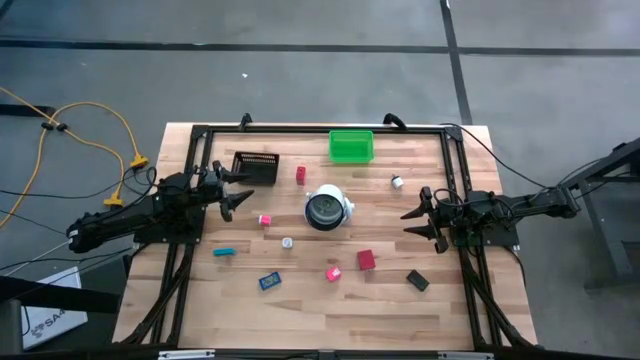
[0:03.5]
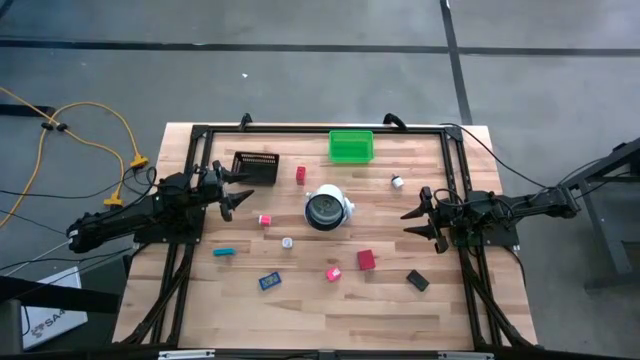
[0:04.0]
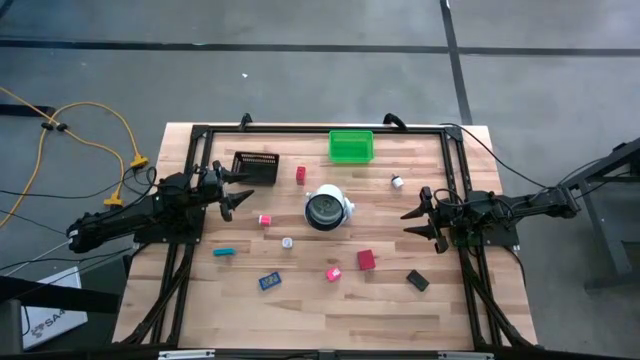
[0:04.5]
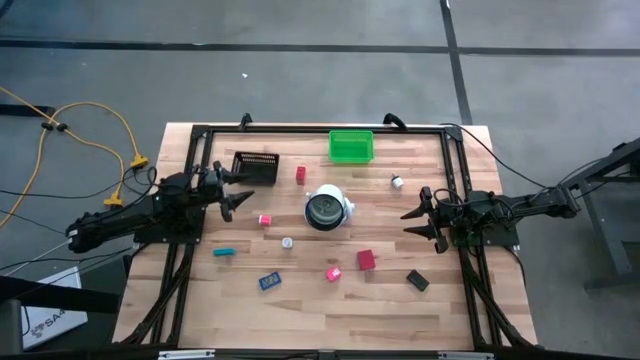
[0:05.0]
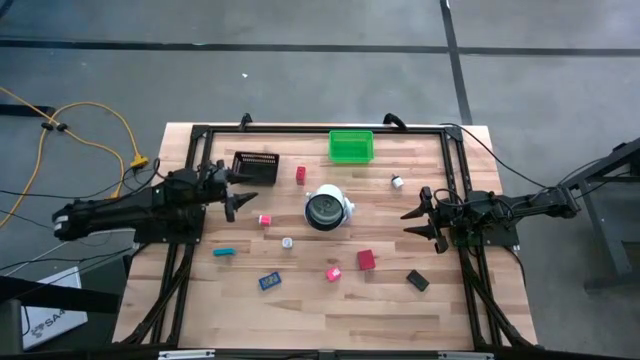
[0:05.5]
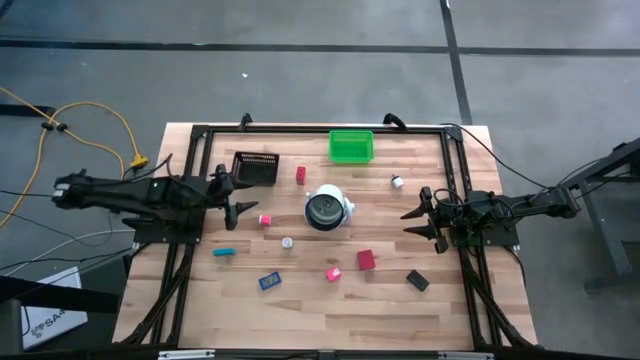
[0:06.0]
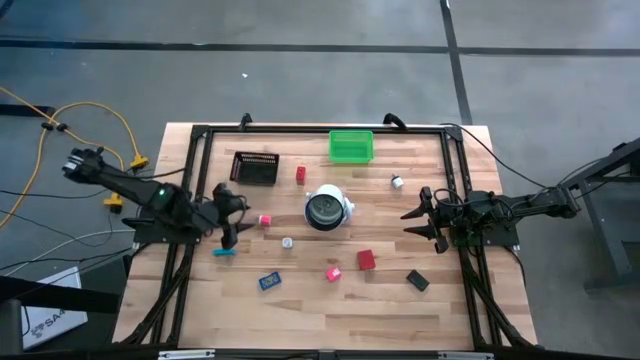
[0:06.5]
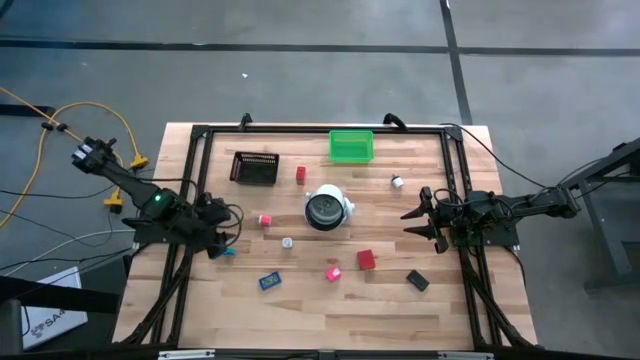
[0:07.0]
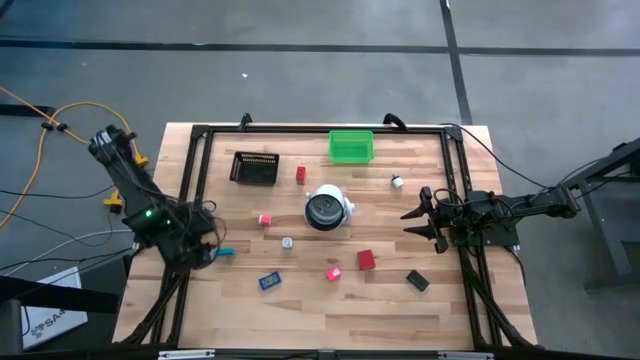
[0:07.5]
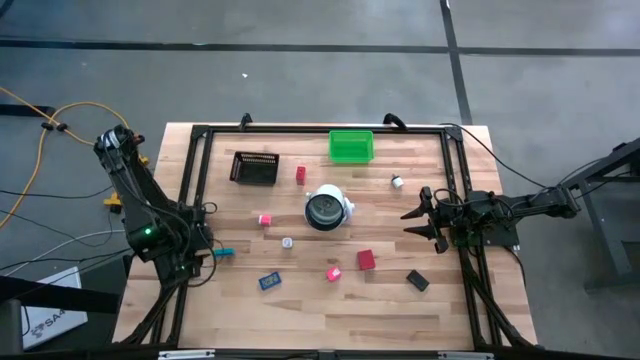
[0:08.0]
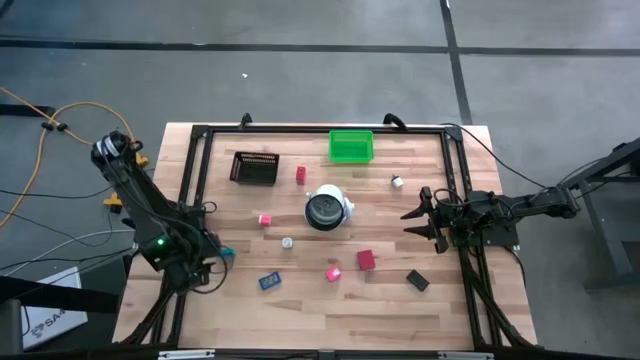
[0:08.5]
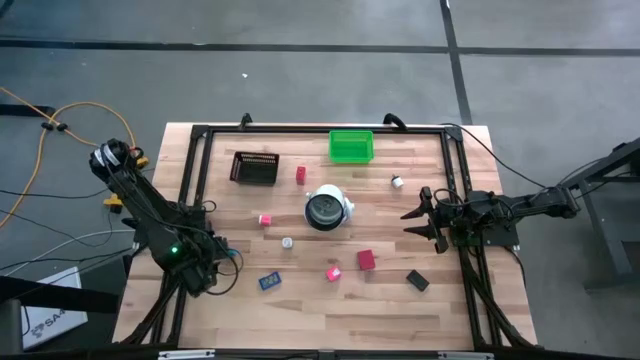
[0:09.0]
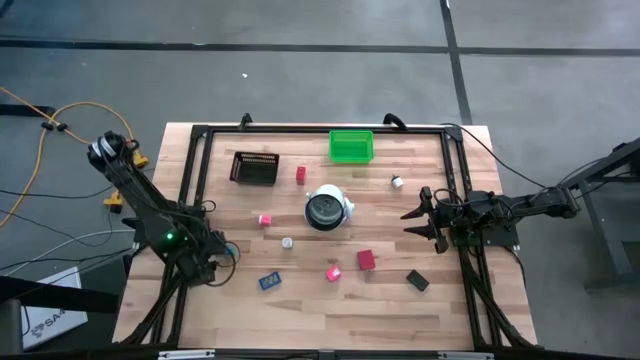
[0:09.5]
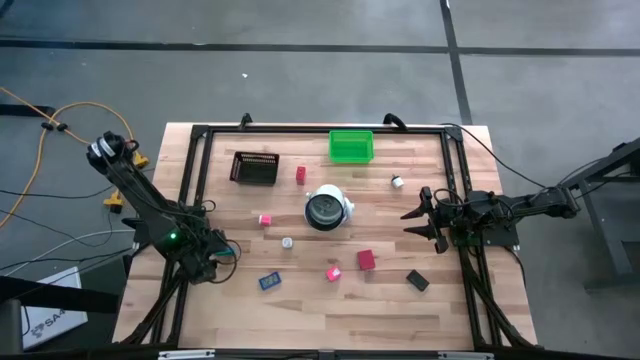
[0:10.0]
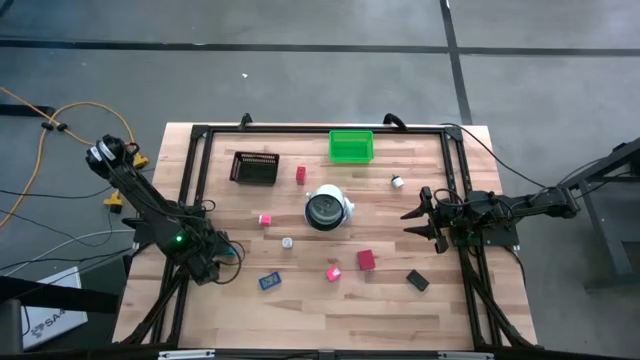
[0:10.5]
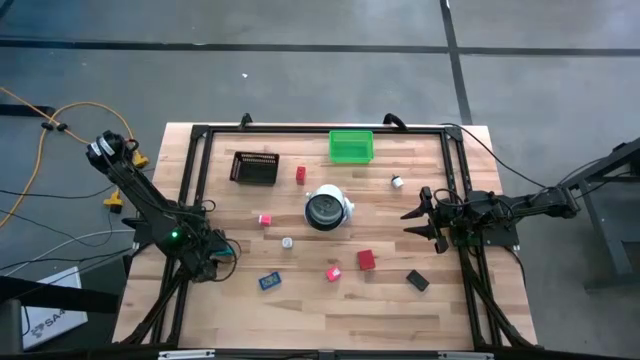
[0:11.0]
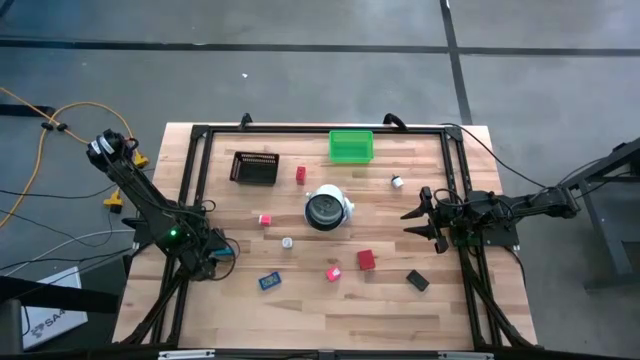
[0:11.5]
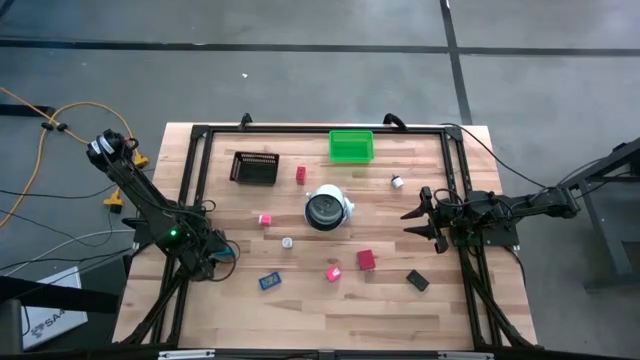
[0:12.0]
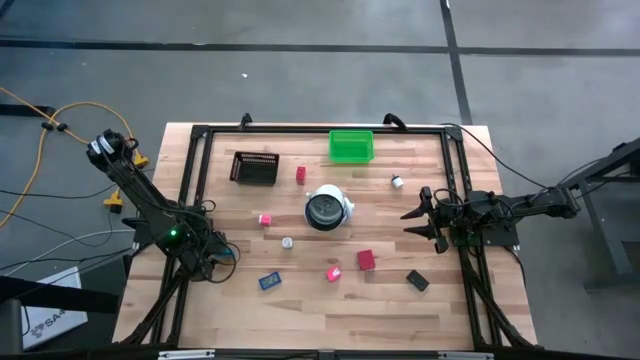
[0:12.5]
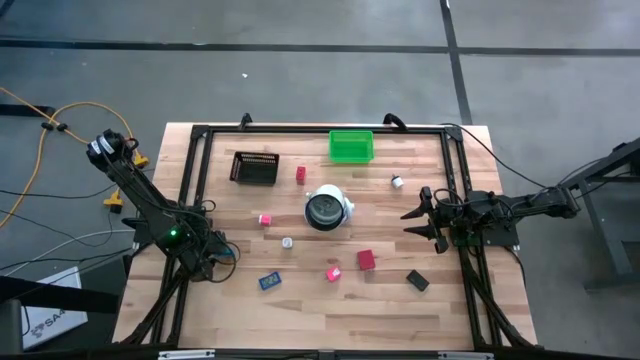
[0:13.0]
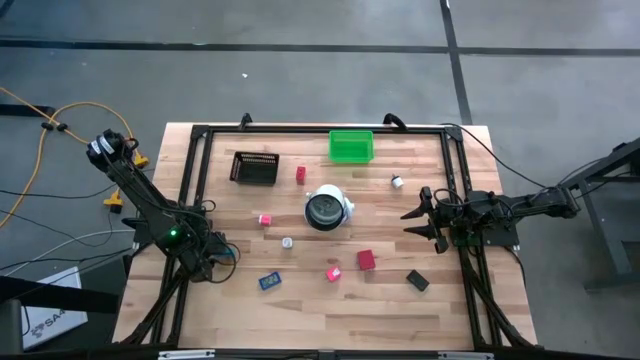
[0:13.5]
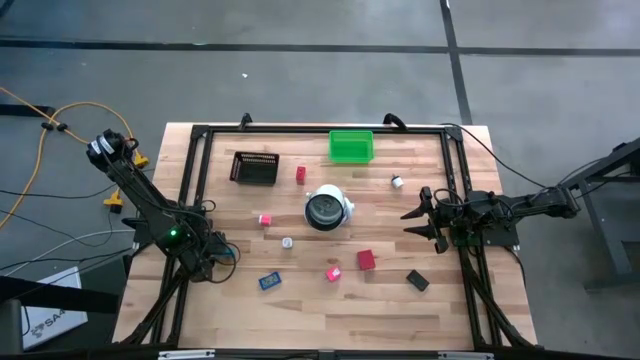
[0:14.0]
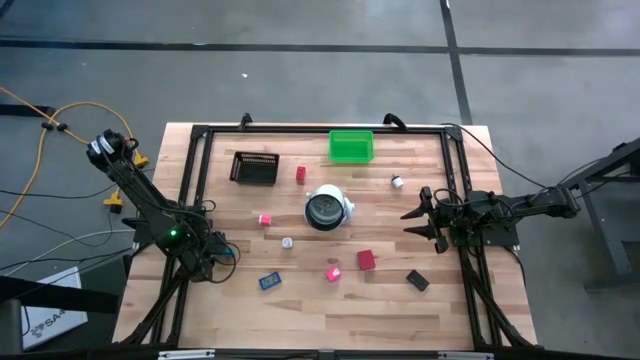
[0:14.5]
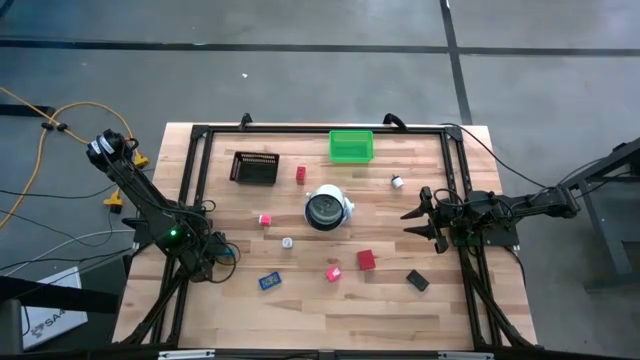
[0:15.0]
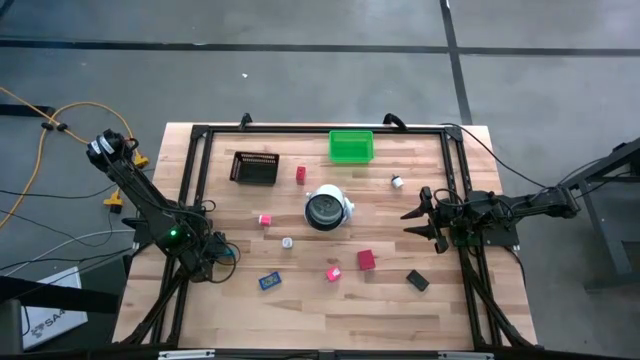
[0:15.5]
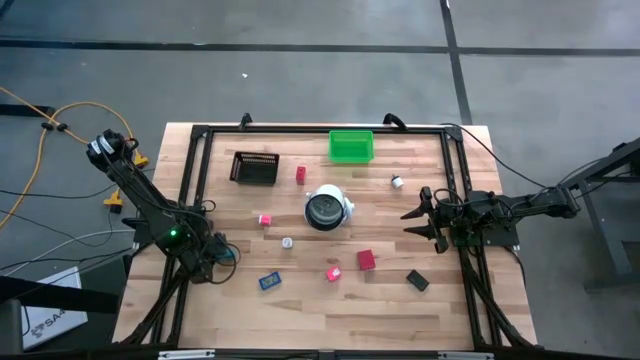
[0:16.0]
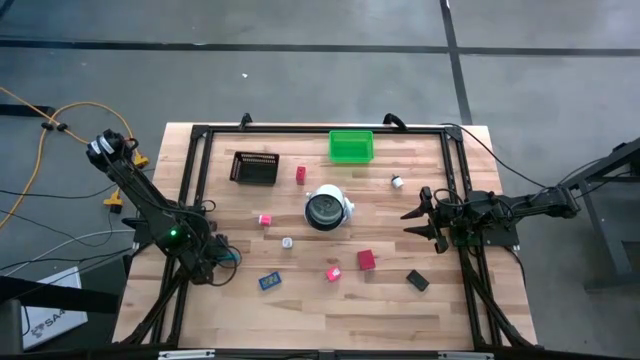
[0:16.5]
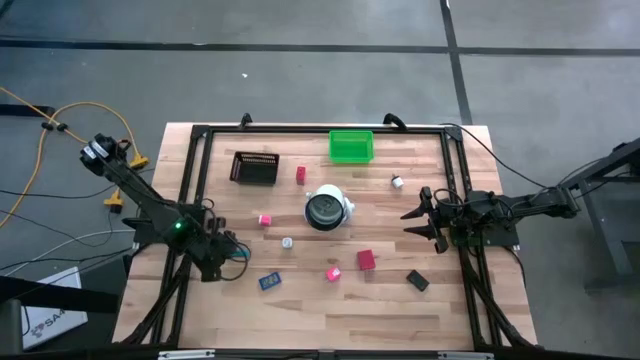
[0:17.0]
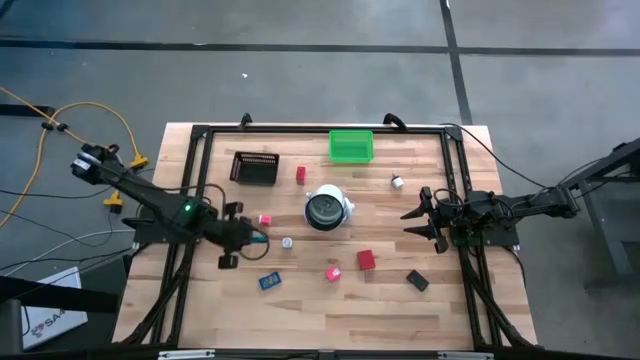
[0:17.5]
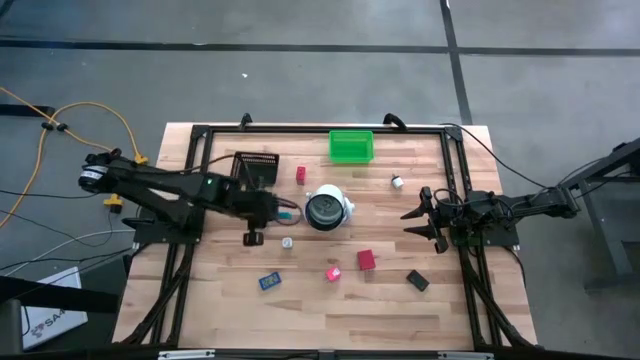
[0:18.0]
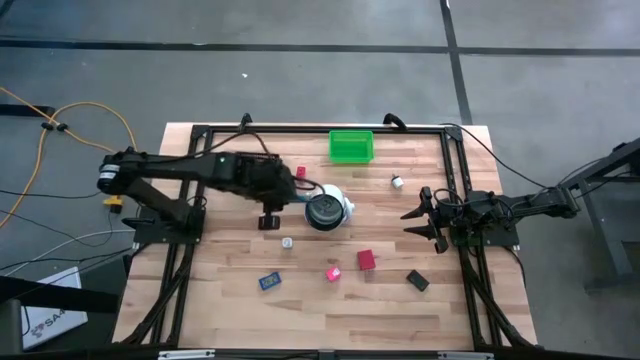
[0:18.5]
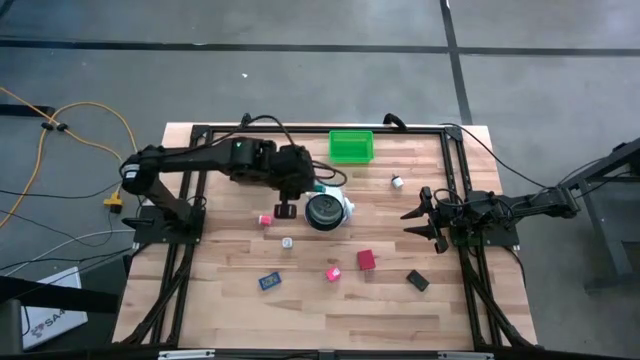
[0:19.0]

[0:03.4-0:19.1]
Task: Pick & Place Office items
Put the light blue digital timer into the green bin

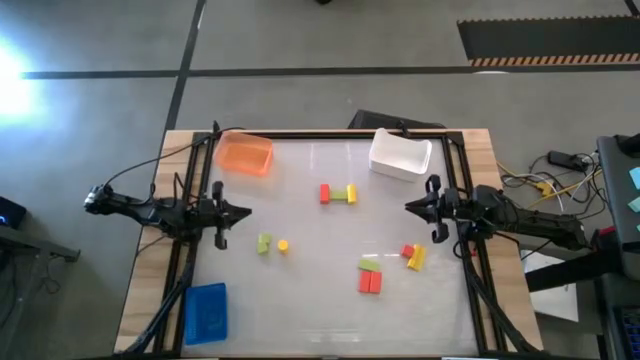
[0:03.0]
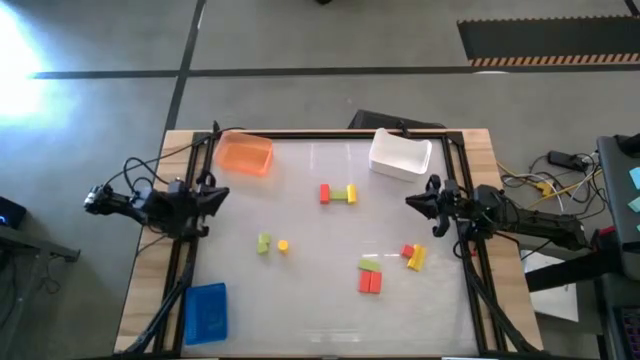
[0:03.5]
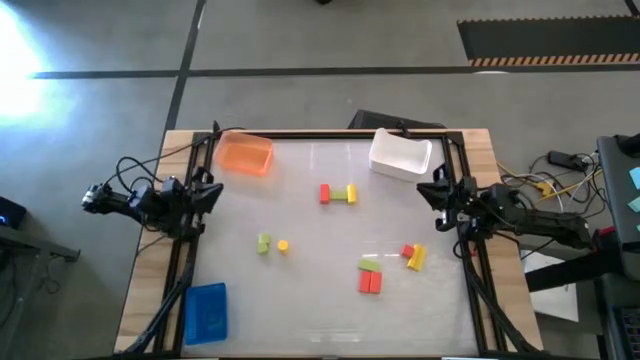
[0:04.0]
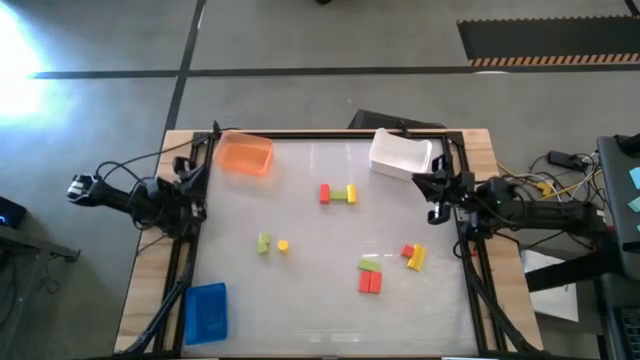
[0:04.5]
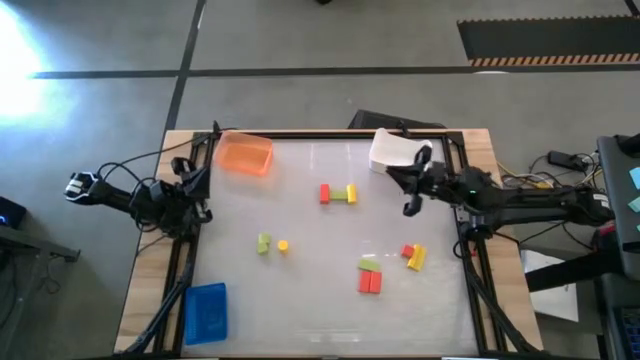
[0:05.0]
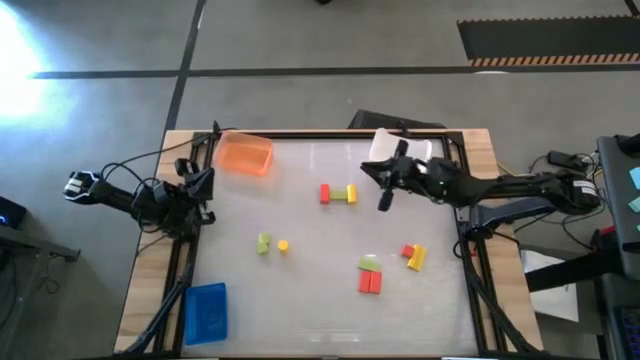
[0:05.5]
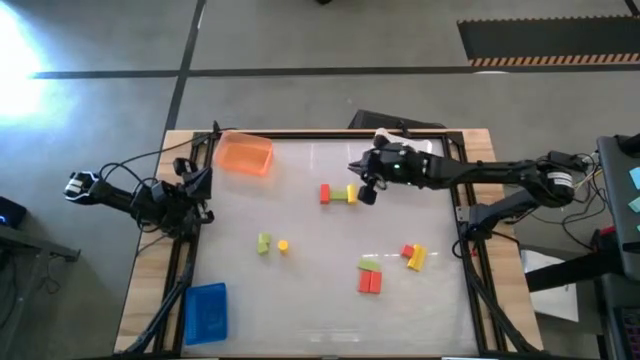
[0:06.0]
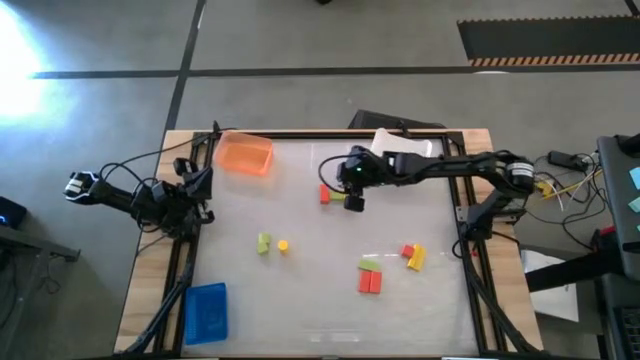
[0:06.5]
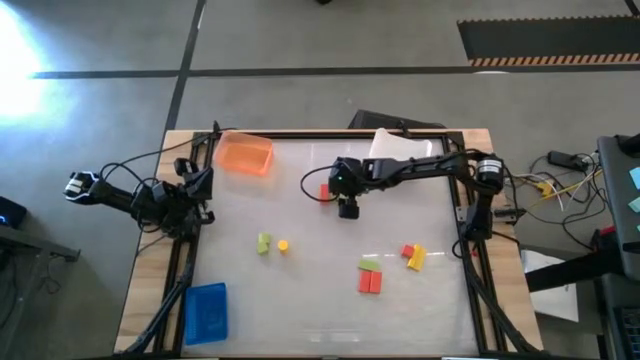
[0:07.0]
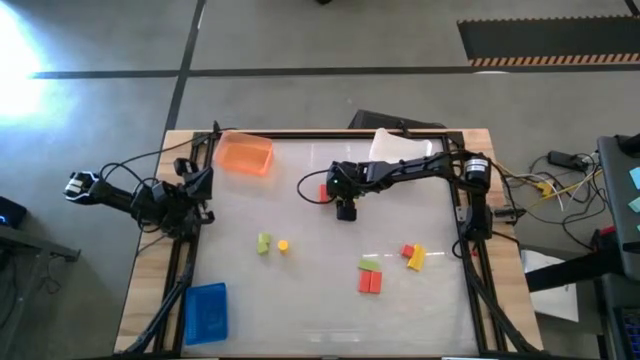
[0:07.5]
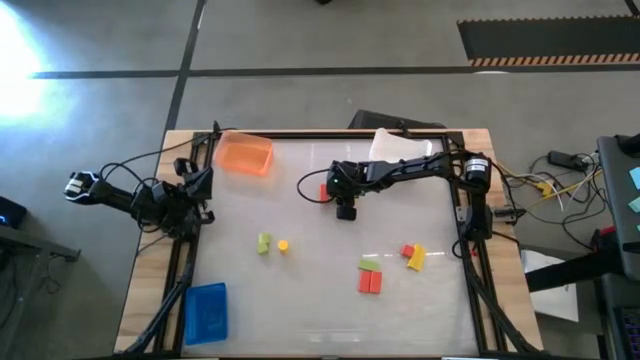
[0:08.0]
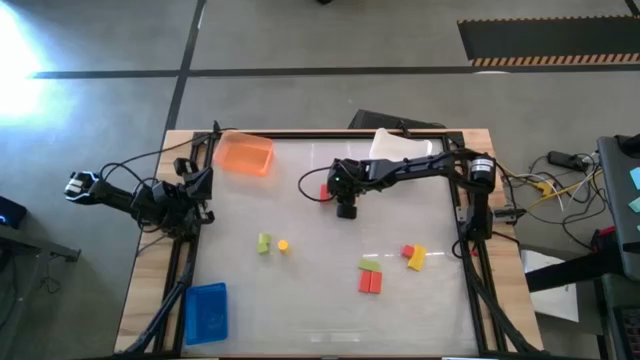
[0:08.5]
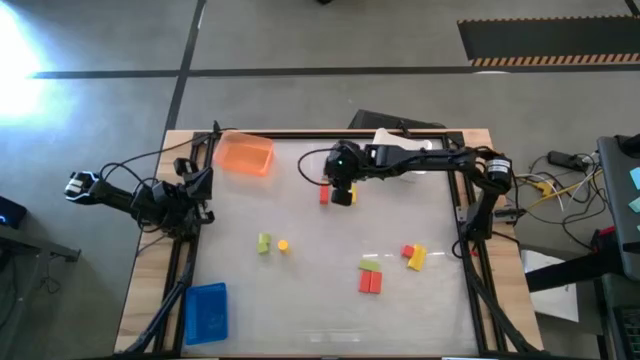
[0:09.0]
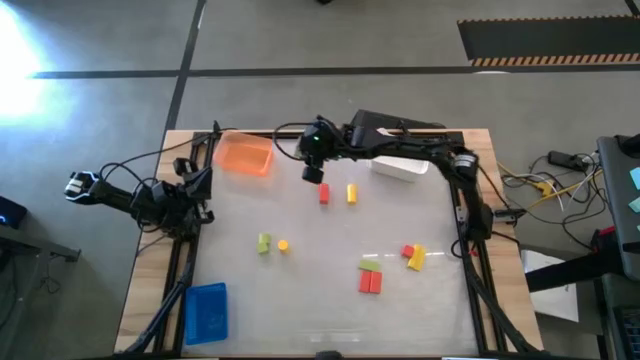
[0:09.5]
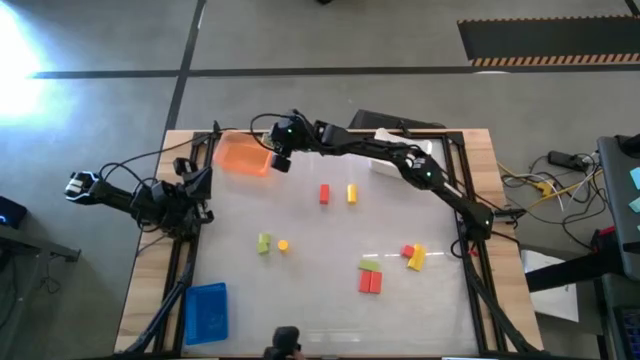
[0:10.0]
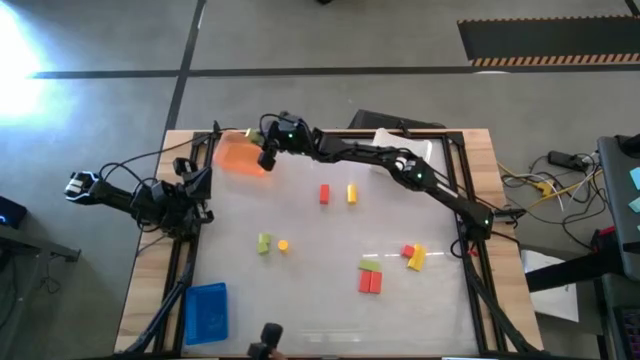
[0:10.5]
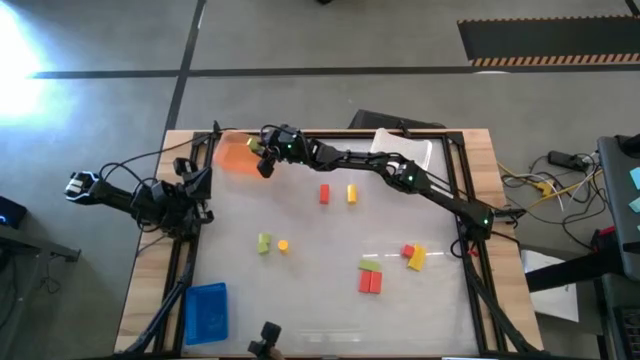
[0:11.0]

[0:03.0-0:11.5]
Task: Sort & place blocks by color
Put the top green rectangular block into the orange bin
